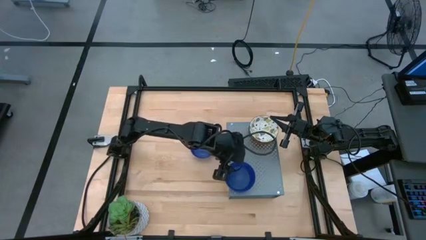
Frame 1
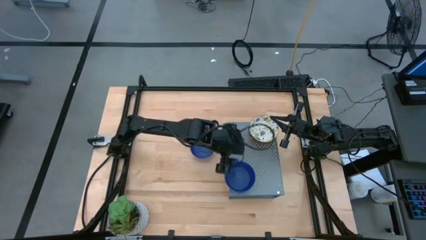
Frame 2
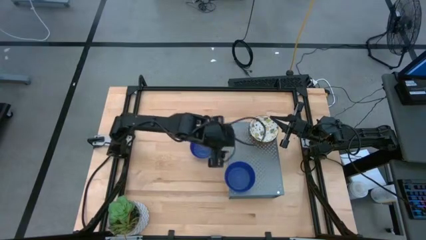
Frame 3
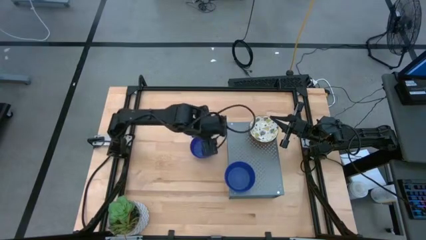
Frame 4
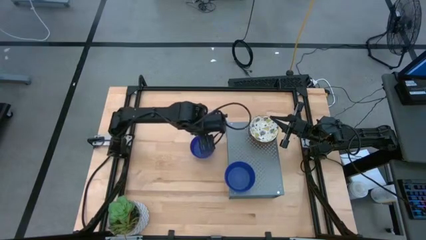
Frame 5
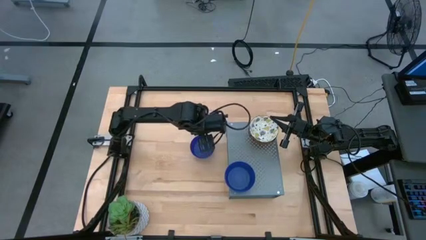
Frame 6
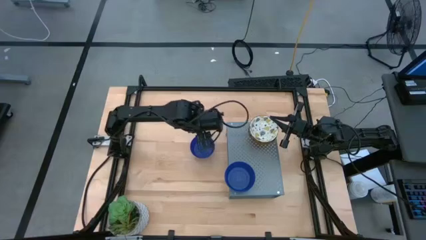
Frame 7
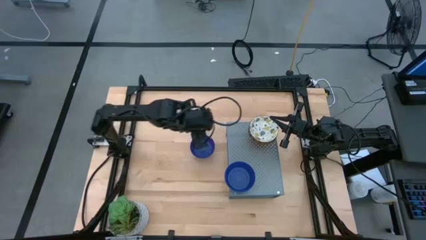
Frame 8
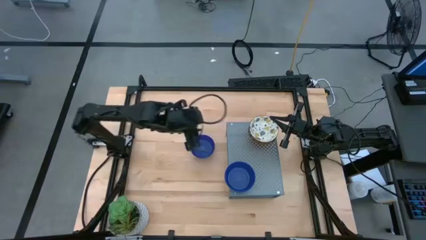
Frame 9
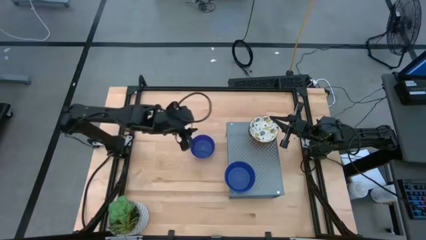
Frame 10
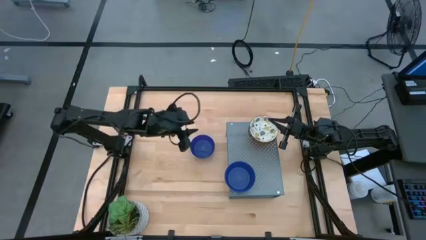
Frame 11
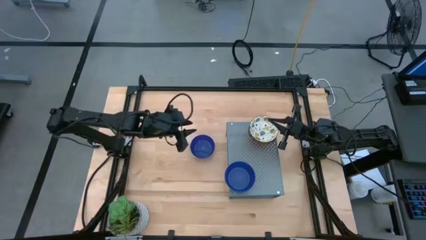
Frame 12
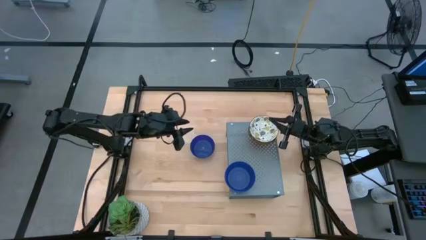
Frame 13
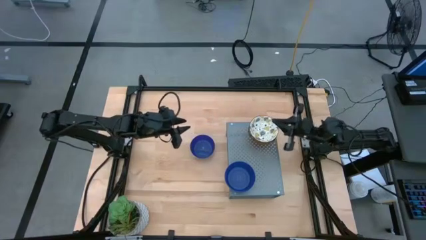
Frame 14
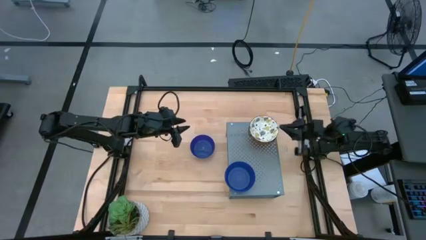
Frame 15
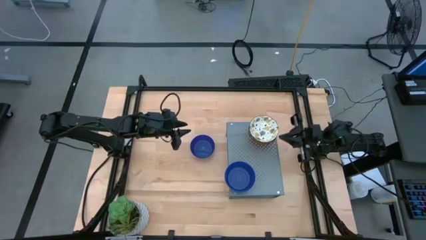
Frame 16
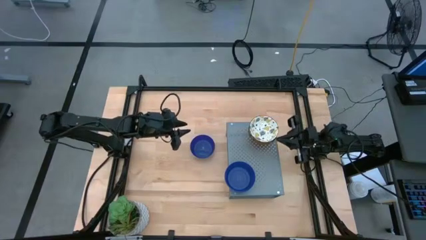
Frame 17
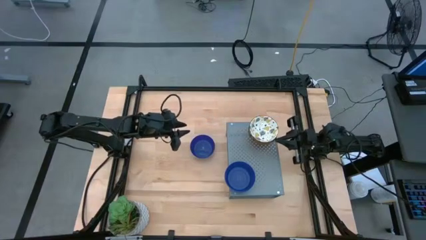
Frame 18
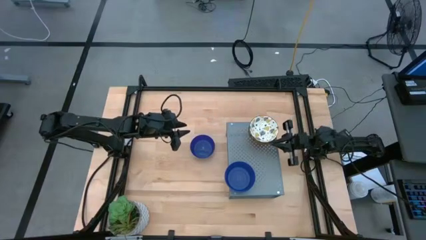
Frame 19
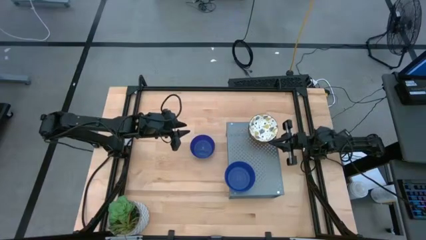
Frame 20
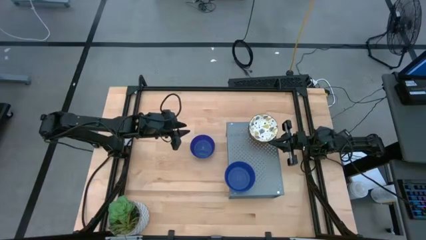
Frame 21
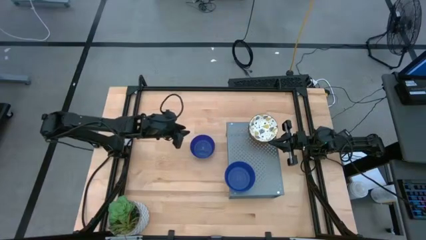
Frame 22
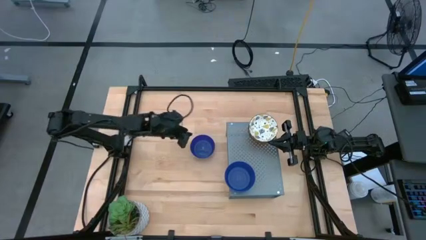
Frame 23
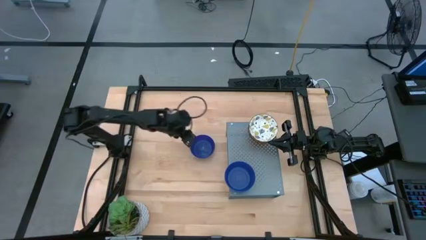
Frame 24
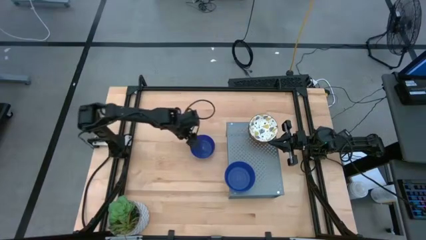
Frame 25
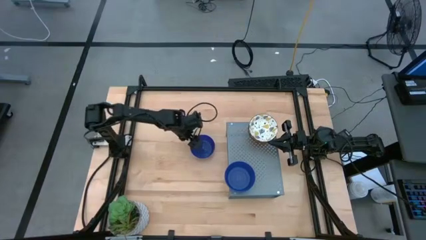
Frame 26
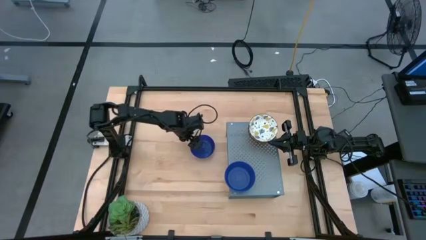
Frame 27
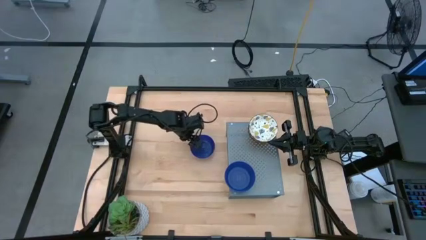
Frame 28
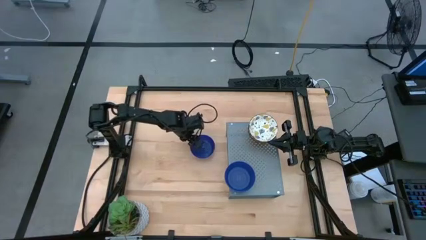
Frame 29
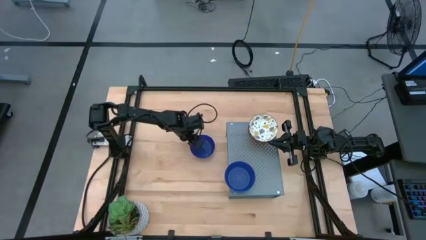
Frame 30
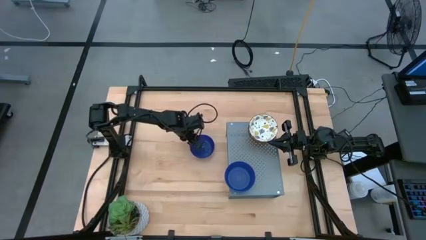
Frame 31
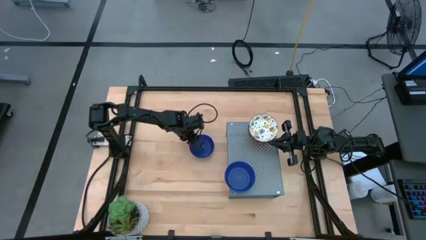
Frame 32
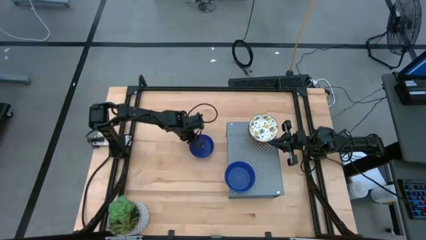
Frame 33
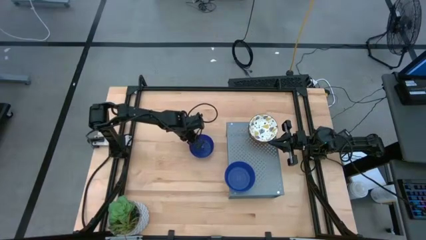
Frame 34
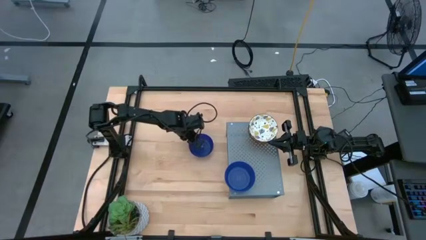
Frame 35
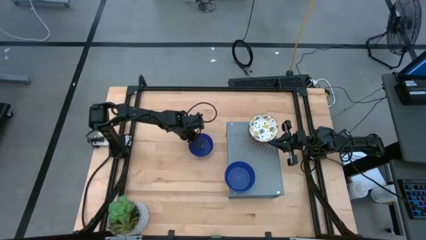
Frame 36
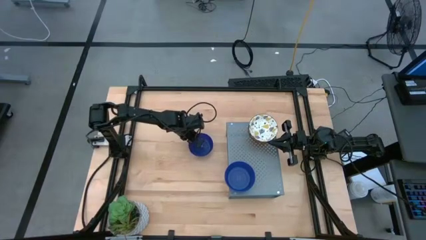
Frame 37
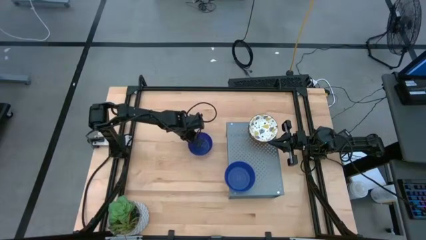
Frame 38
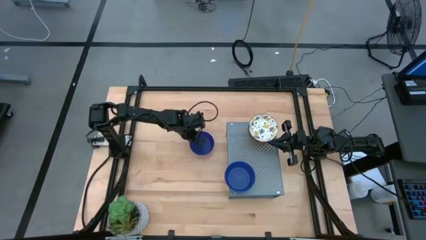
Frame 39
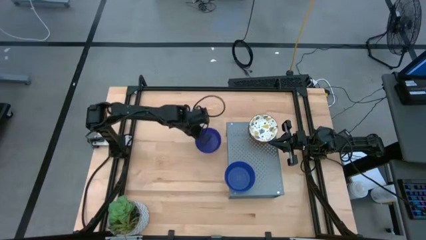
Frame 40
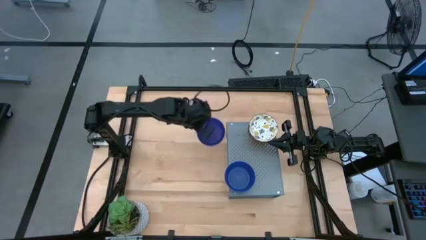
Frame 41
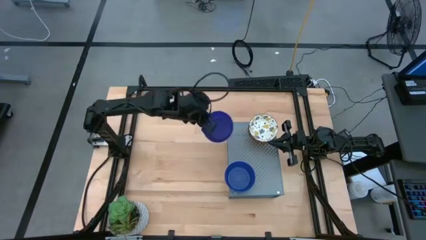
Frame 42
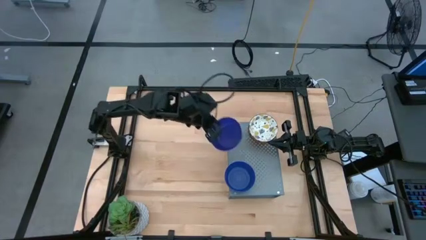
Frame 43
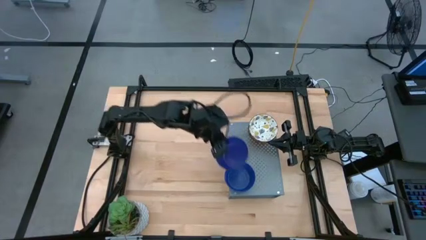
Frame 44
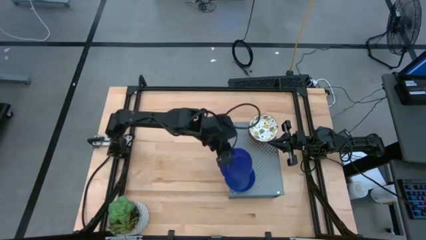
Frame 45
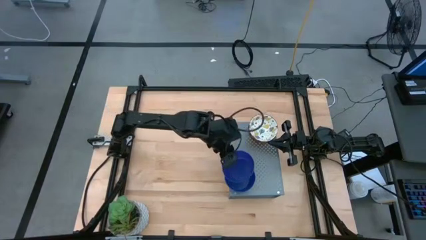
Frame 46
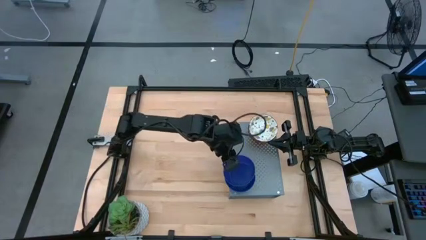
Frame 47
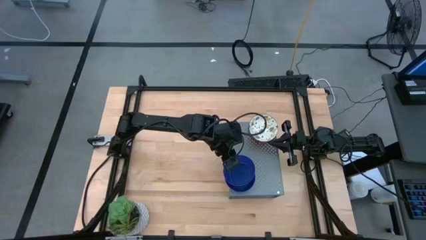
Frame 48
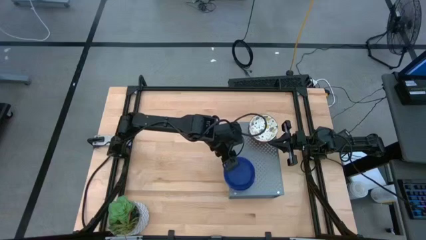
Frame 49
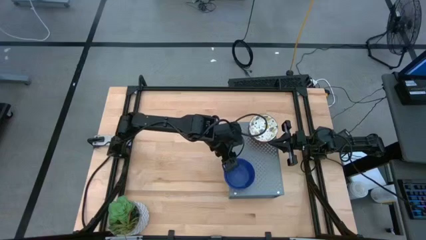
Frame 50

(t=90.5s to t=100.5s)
Task: Pick & Place Mini bowls
Stack the blue bowl on the blue bowls on the shelf

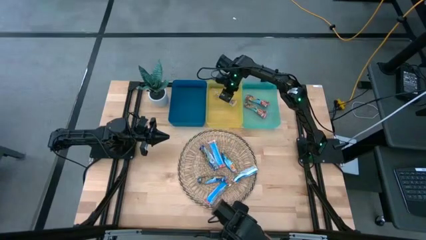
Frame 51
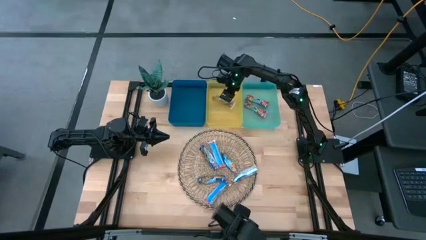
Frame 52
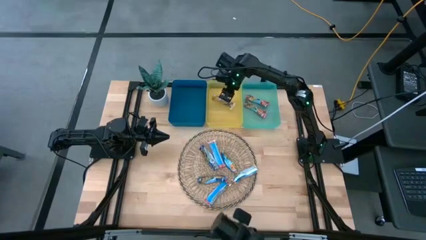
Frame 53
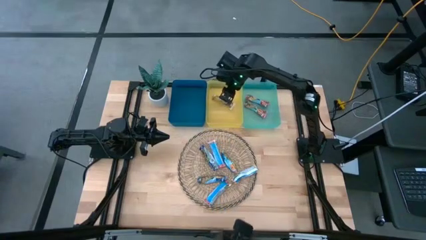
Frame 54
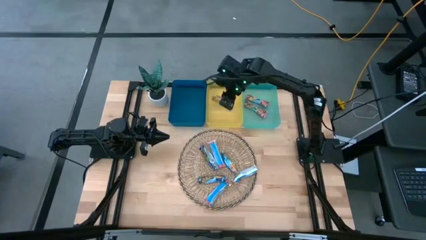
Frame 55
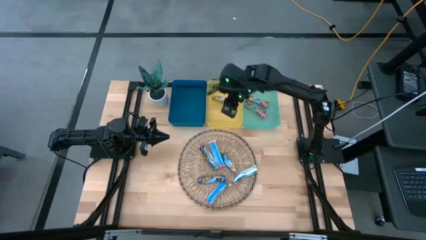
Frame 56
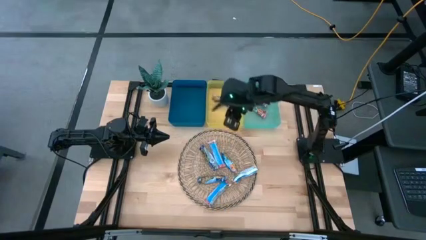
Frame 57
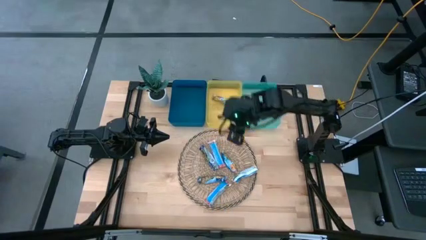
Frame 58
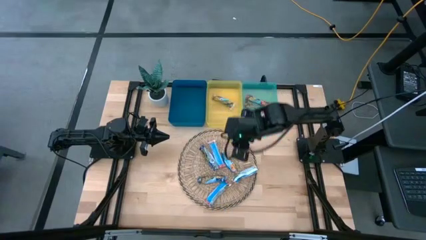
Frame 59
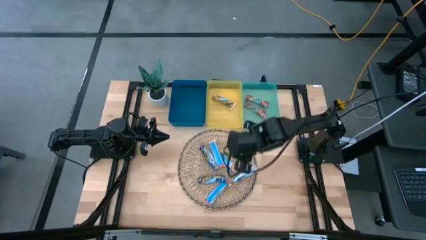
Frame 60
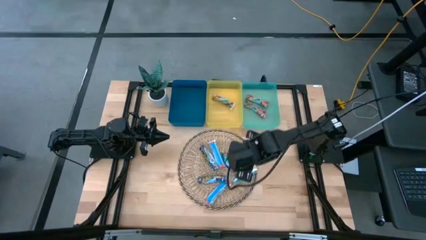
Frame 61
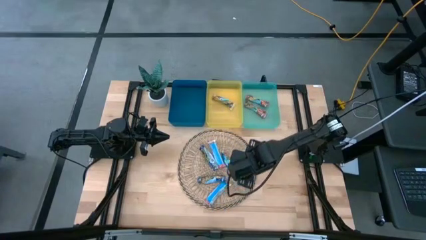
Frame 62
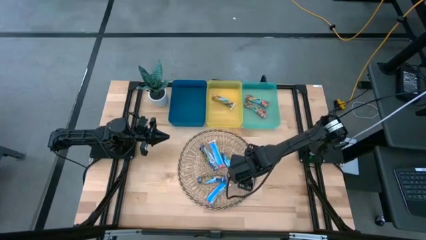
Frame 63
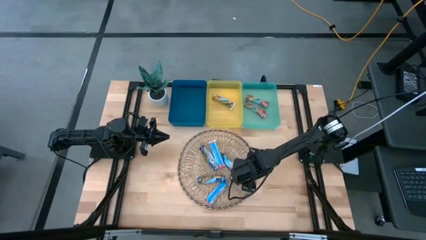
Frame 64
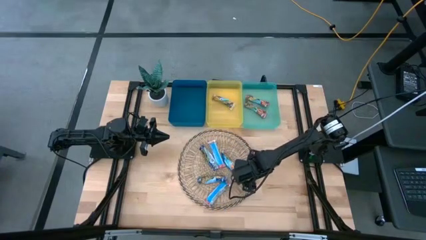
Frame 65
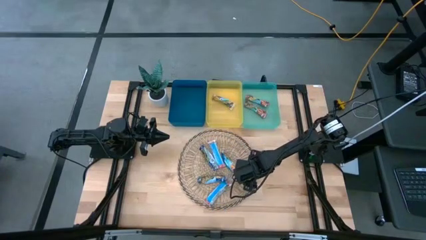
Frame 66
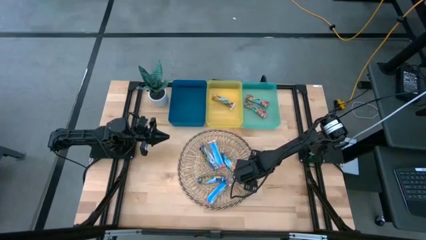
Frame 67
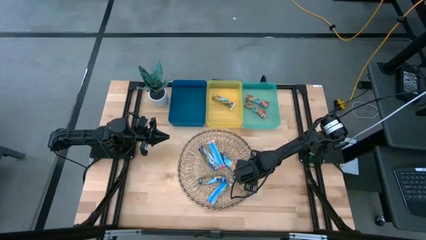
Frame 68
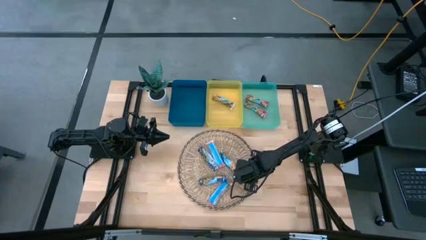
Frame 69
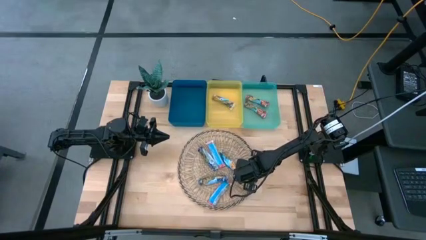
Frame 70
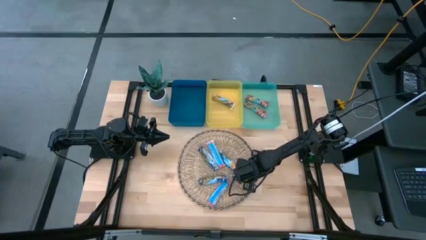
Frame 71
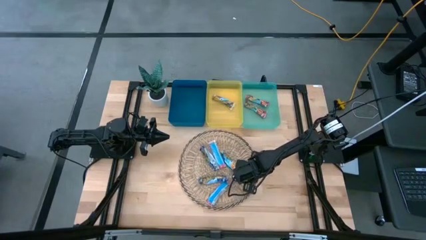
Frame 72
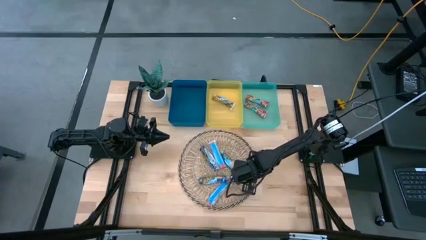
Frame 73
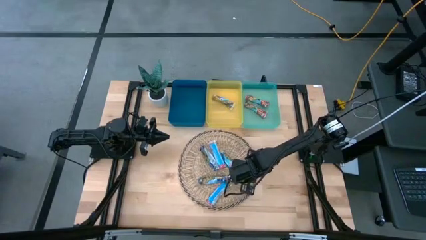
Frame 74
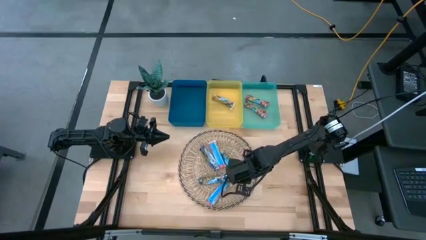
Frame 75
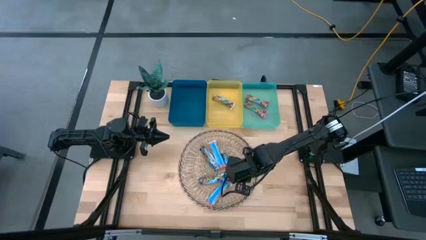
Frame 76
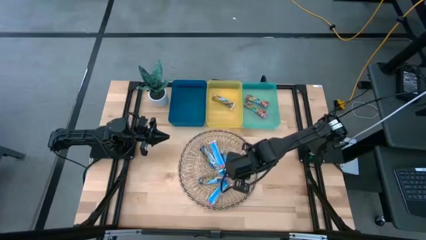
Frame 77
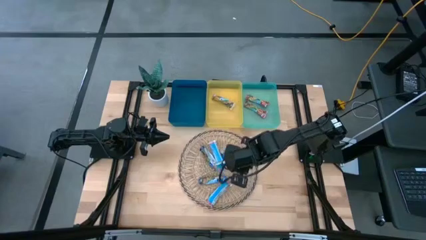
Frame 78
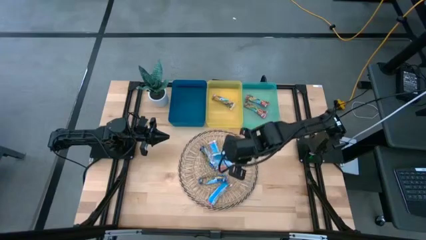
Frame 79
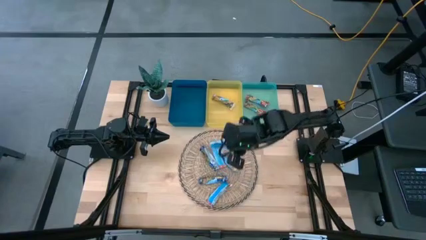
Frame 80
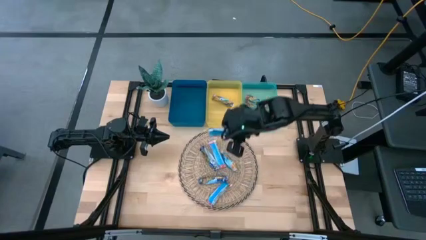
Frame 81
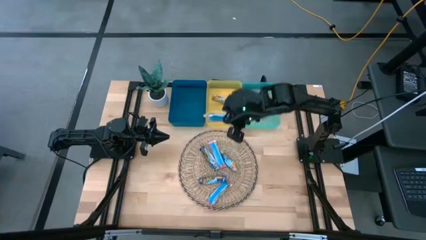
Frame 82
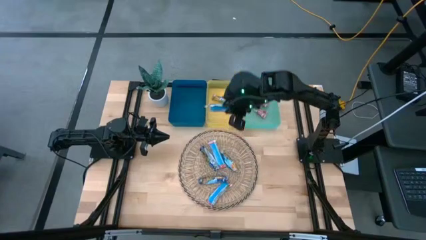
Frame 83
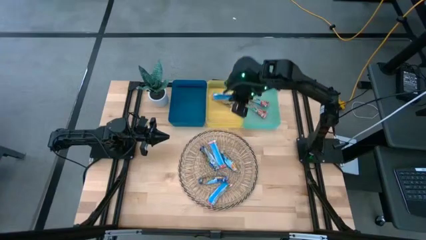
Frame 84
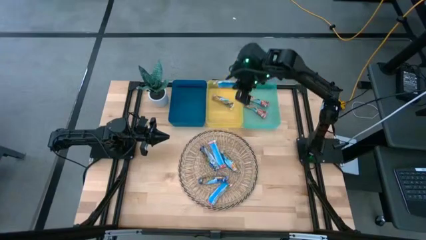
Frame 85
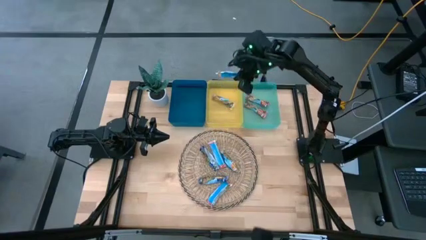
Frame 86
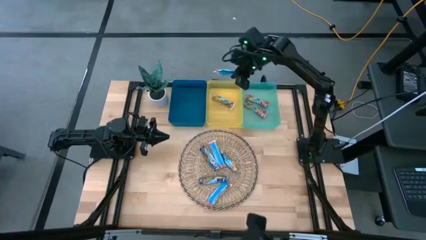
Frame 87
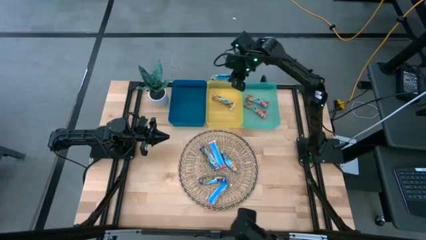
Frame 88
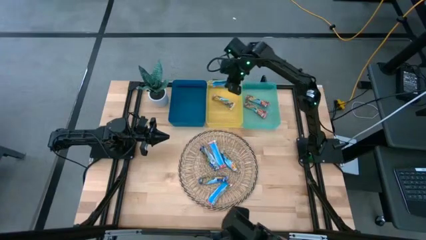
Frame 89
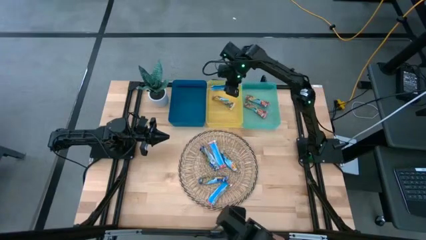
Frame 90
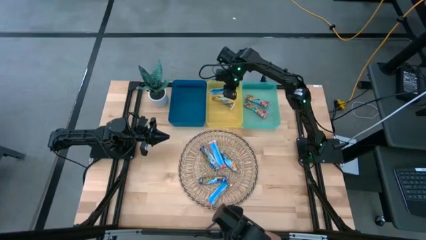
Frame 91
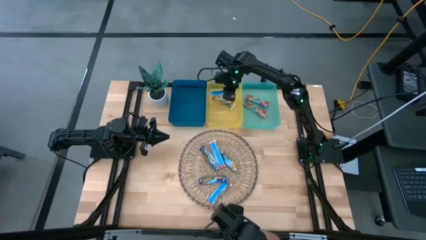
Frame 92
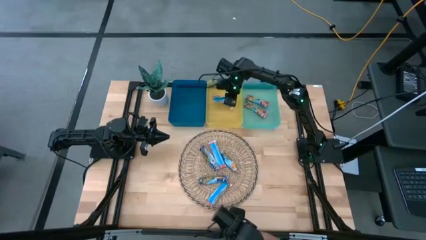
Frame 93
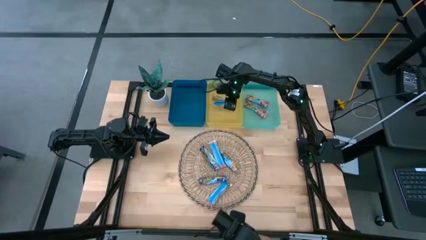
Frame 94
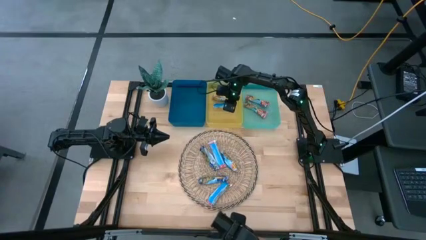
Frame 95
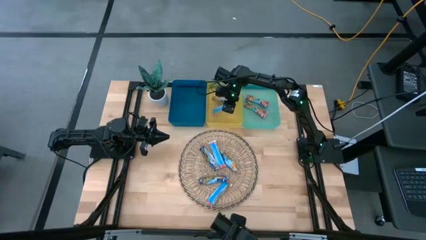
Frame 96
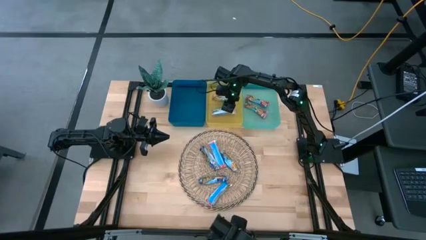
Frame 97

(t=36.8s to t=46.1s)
Task: Pick and place Granola Bars by type
Put the yellow granola bar into the yellow bin
